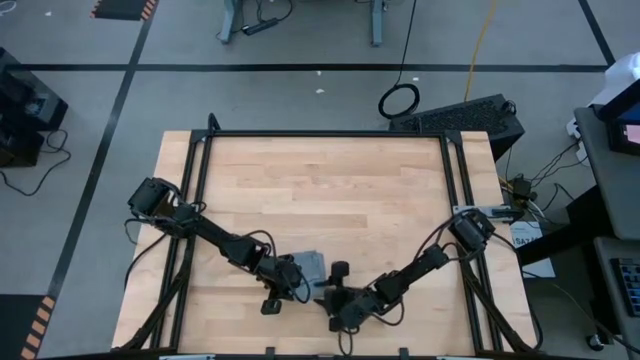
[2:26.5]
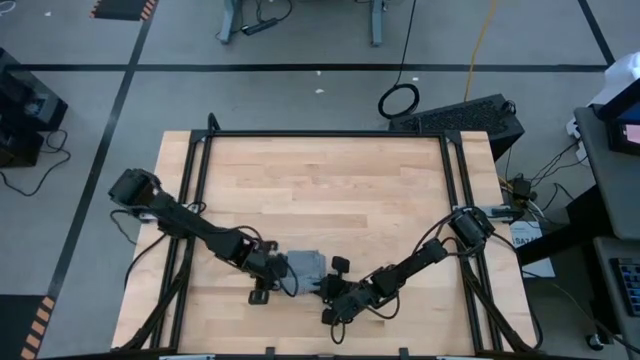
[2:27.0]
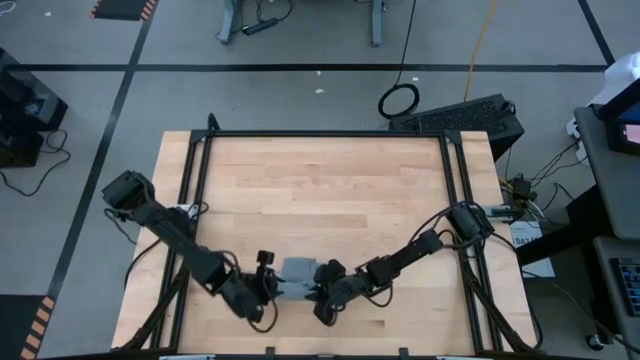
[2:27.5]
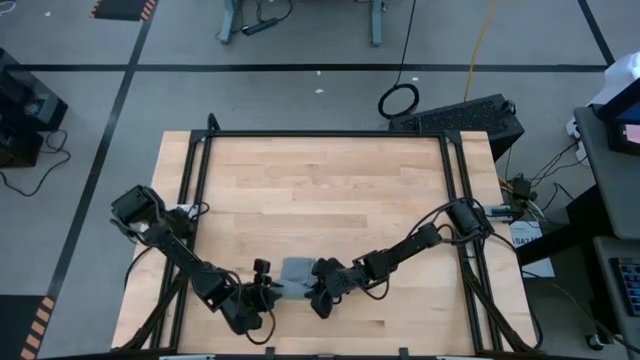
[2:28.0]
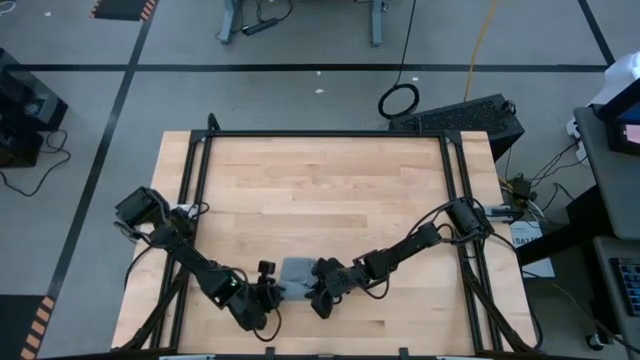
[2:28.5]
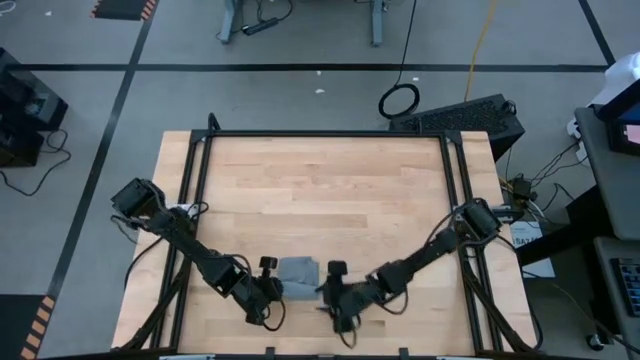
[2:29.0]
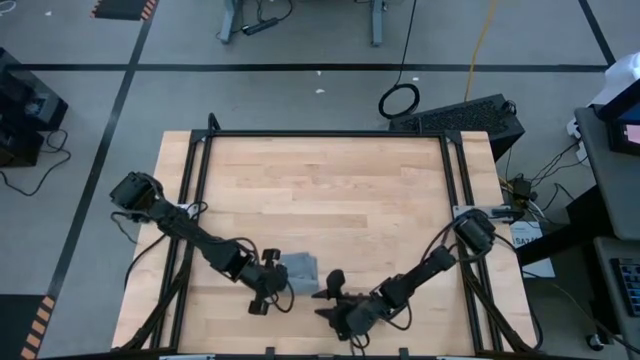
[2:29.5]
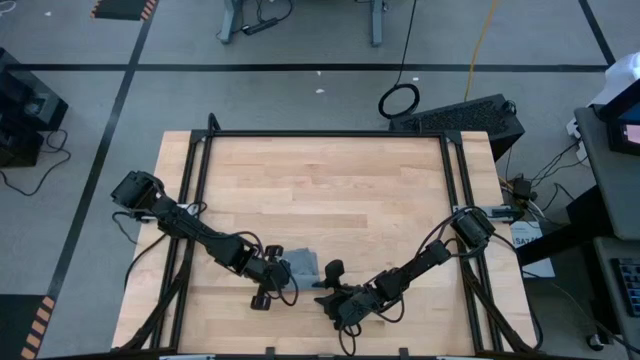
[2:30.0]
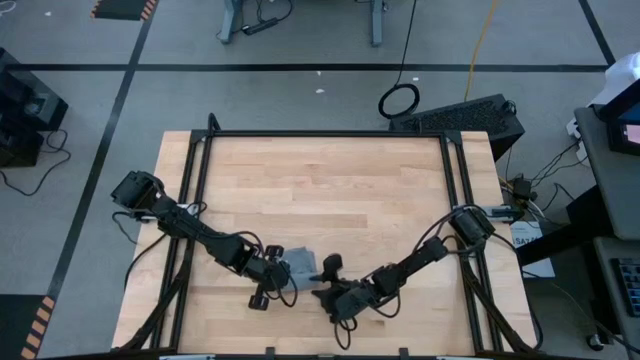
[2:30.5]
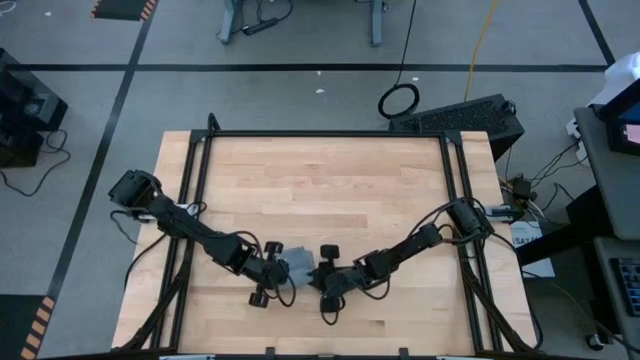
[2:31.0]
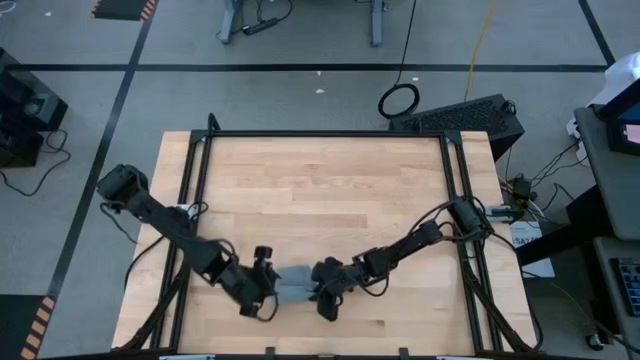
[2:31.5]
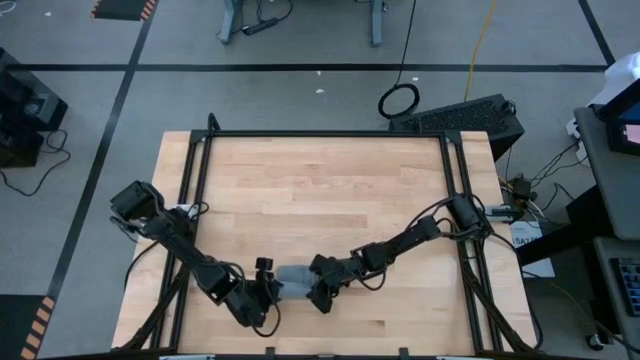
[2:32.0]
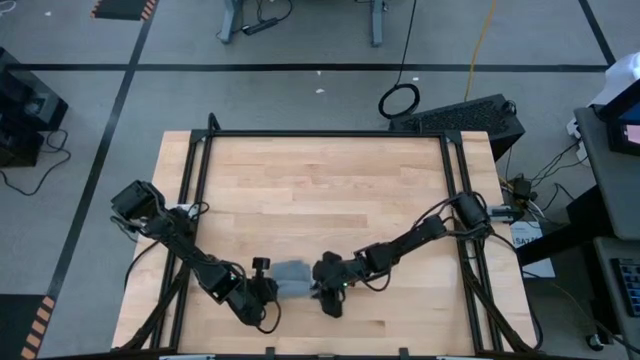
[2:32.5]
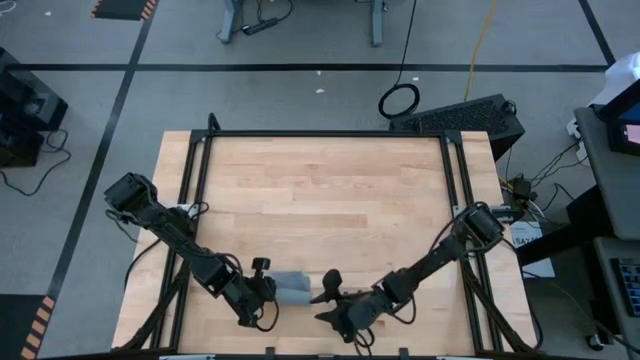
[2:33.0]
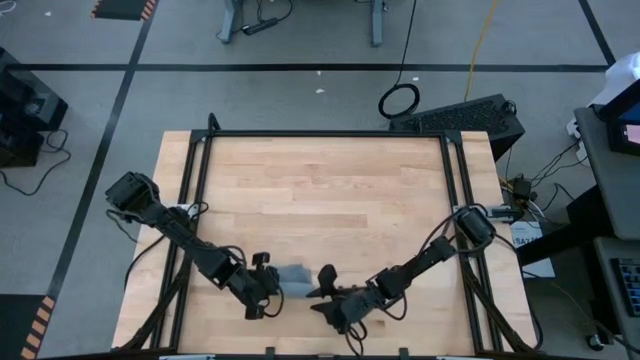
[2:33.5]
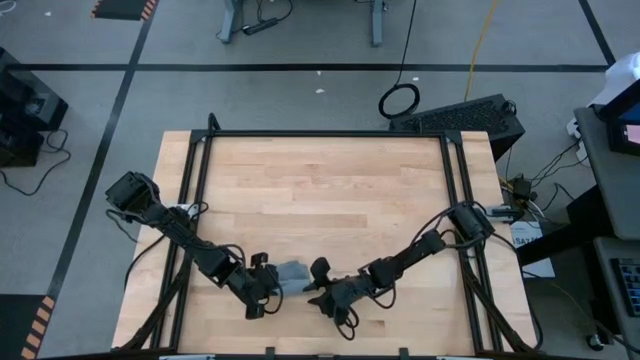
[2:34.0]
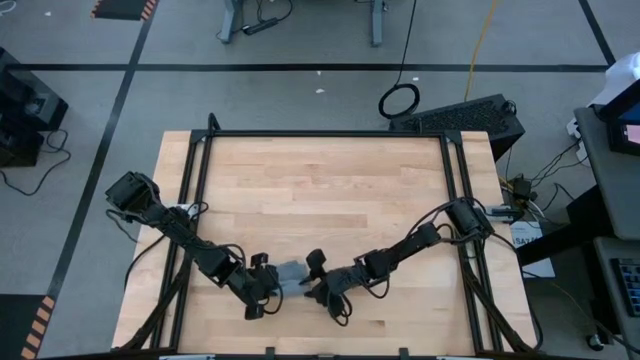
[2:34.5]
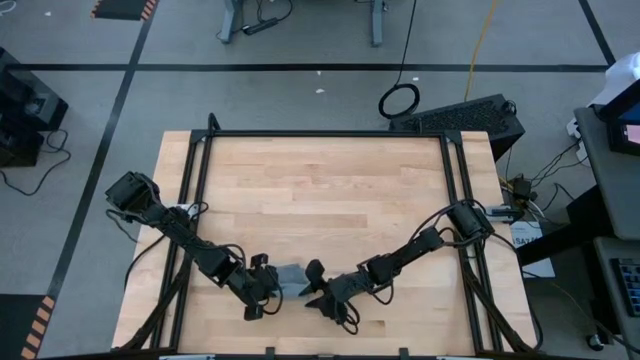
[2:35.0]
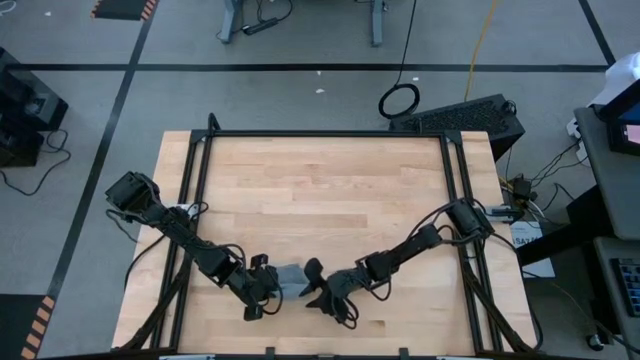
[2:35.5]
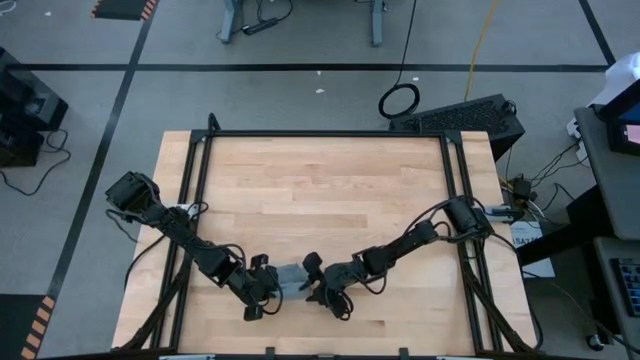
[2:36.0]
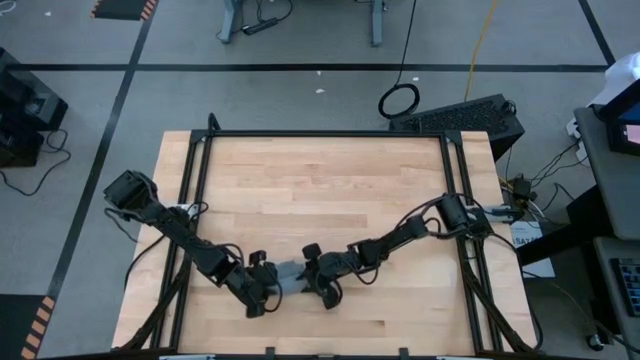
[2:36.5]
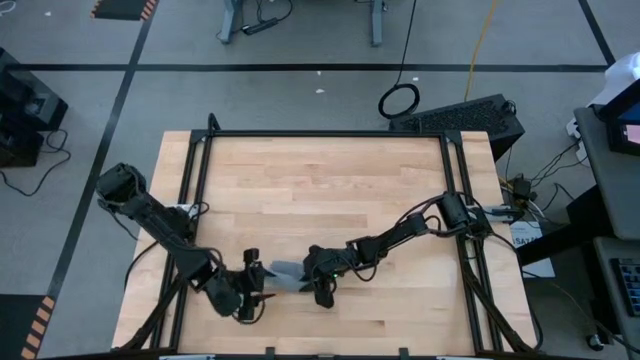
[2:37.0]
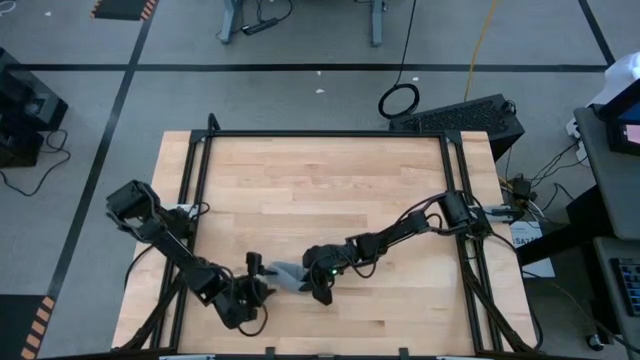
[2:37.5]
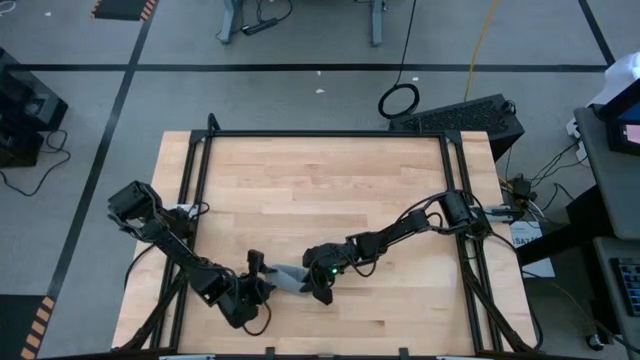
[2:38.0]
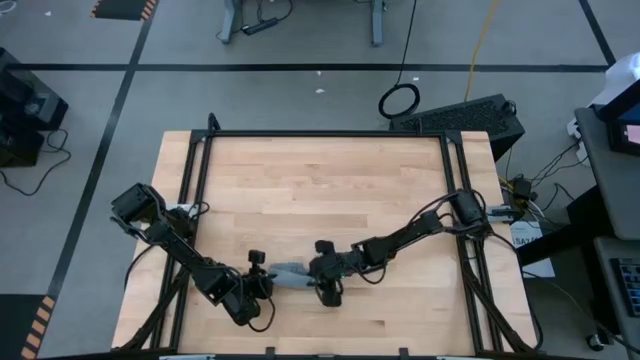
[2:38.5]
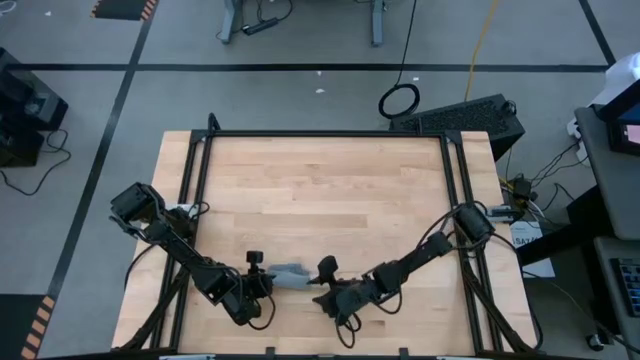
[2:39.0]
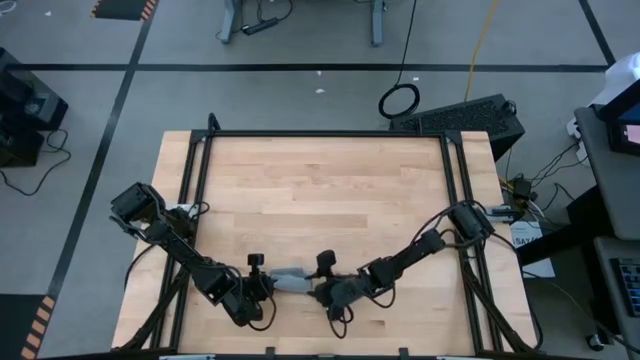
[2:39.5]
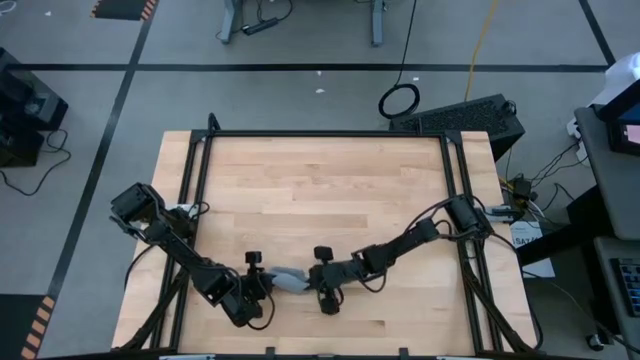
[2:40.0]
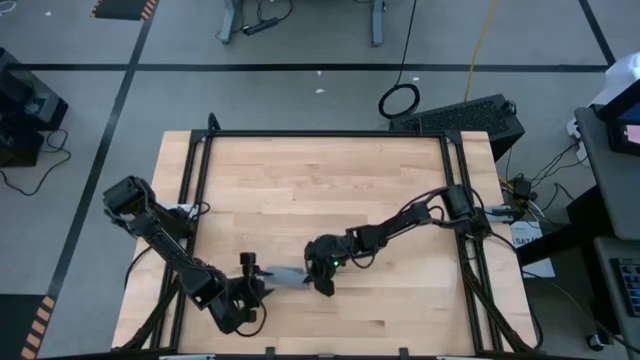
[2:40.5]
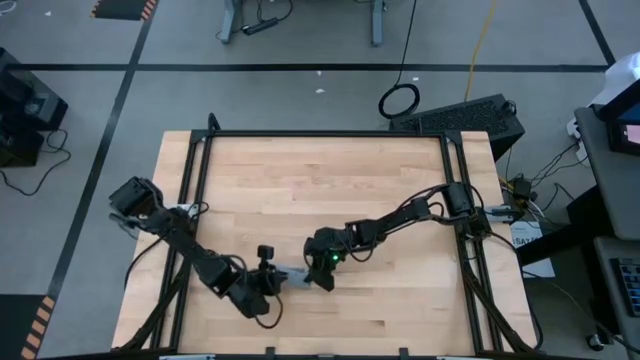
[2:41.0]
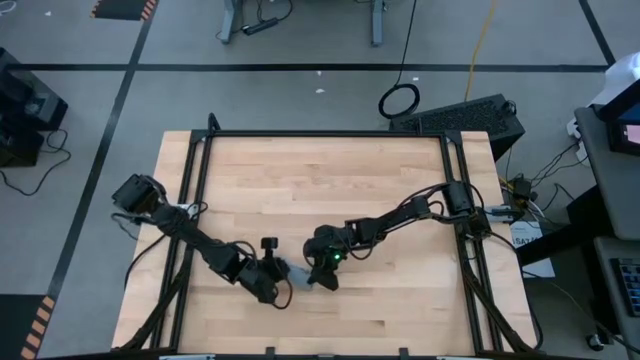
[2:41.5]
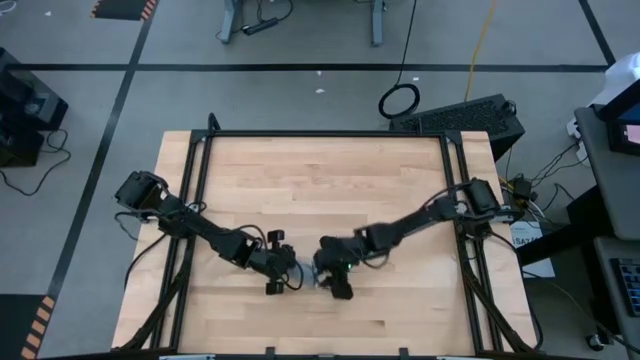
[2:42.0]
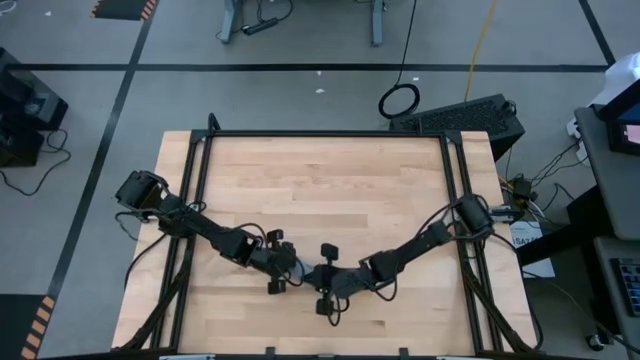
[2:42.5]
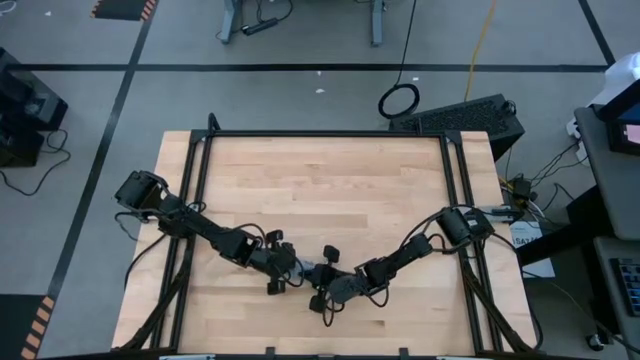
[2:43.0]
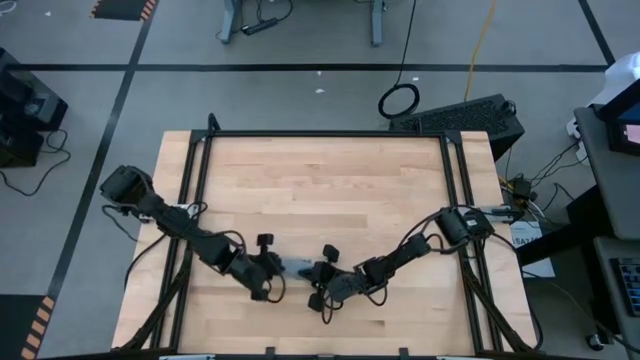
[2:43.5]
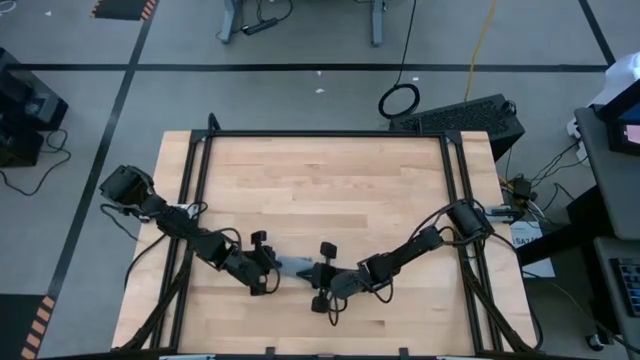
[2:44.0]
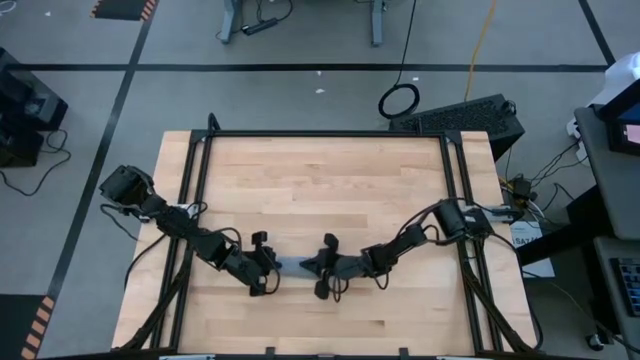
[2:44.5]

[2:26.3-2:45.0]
Task: Roll towel
Roll the gray towel on the table

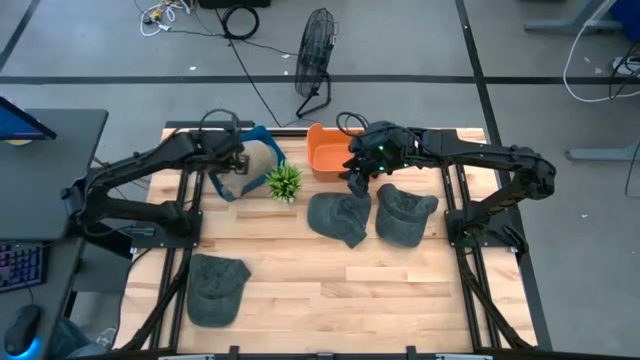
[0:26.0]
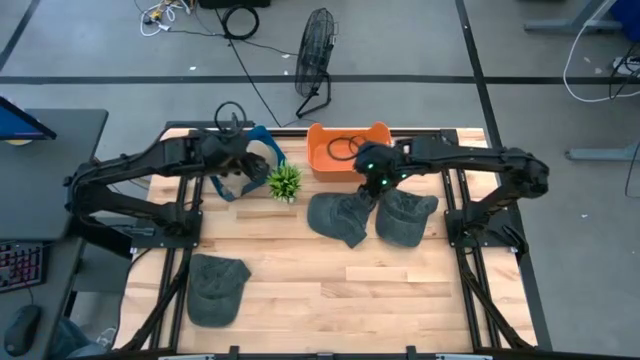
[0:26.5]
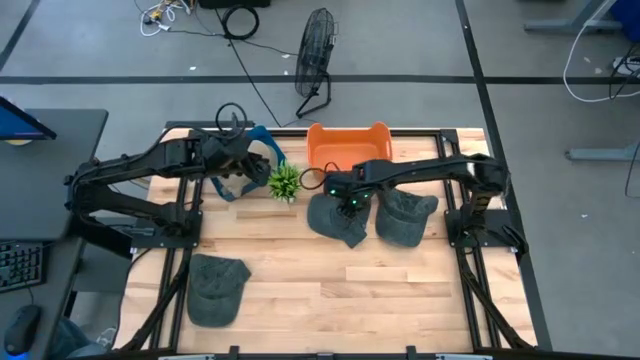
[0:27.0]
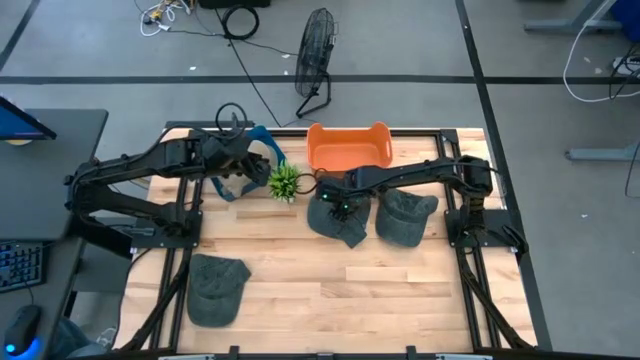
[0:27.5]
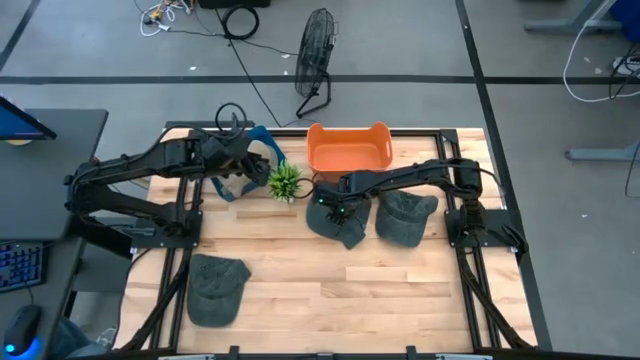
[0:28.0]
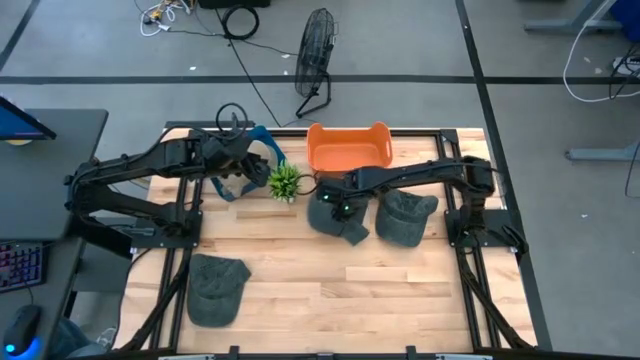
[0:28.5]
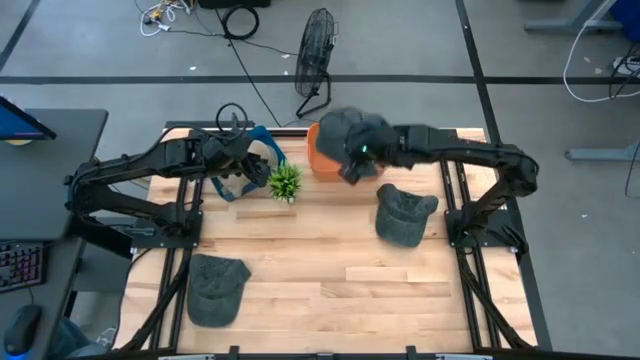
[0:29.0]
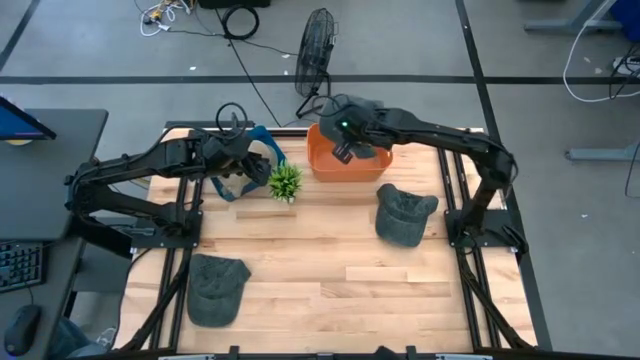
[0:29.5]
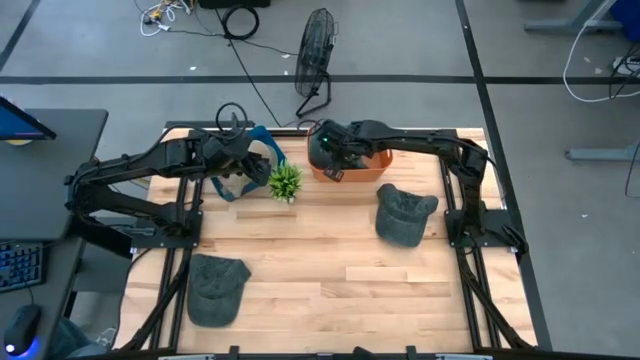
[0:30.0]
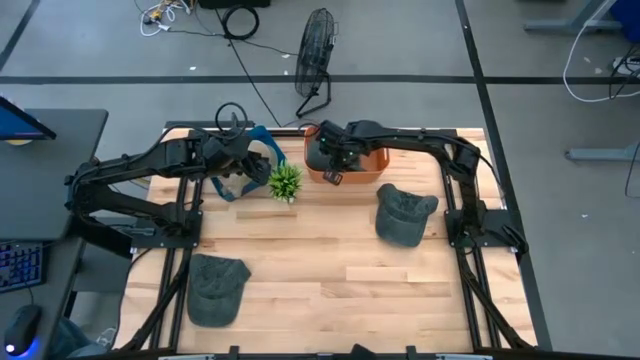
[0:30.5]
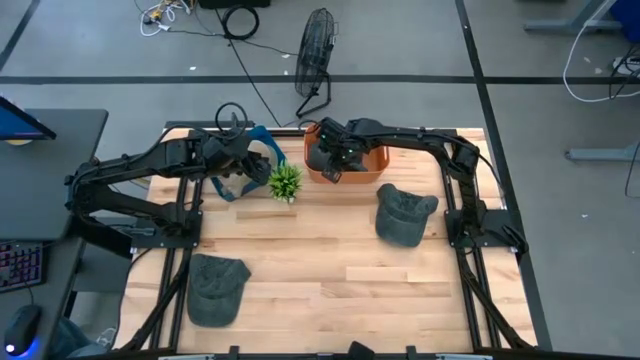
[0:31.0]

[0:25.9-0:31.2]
Task: Pick & Place hat
Put the middle black cap into the orange bin
